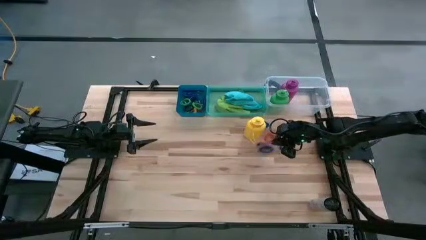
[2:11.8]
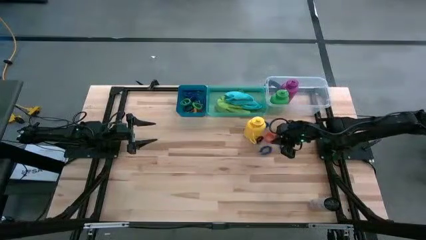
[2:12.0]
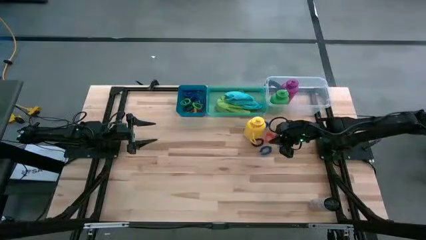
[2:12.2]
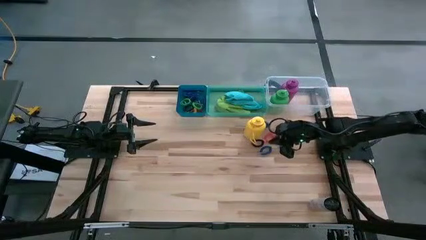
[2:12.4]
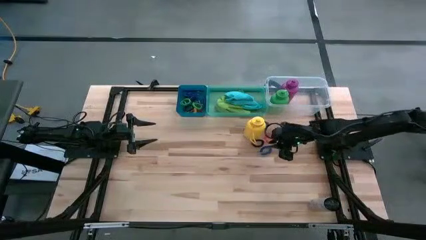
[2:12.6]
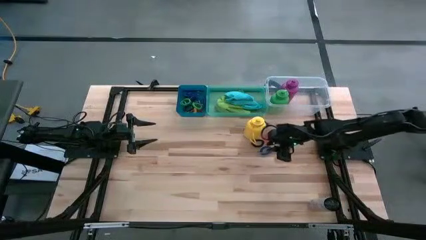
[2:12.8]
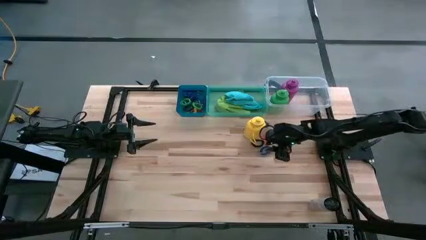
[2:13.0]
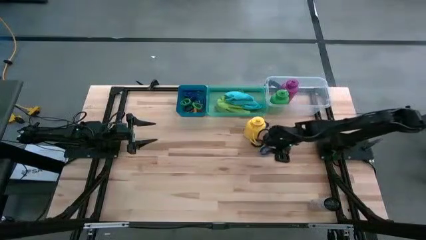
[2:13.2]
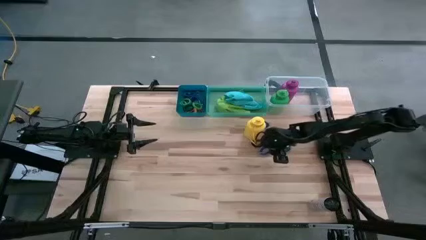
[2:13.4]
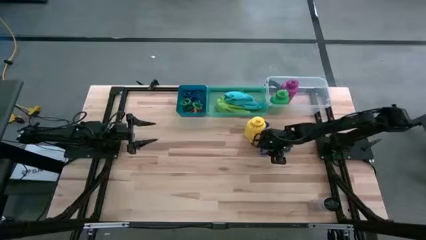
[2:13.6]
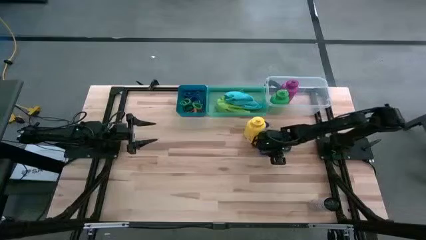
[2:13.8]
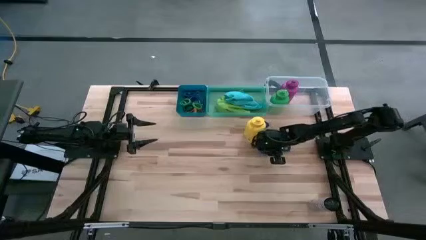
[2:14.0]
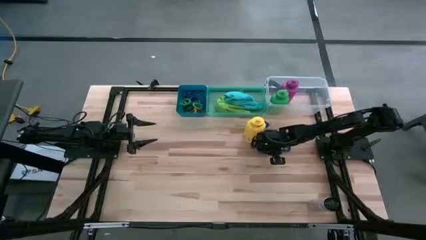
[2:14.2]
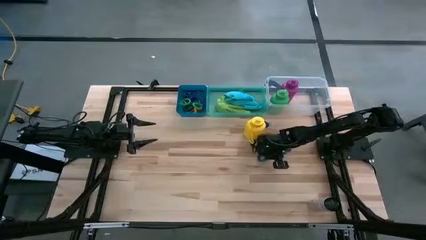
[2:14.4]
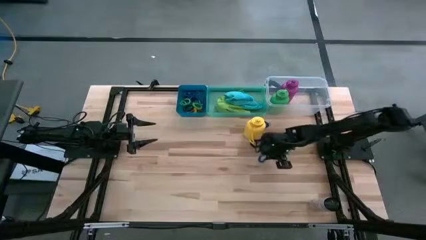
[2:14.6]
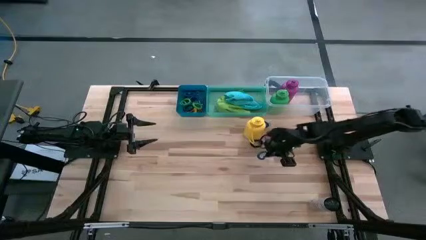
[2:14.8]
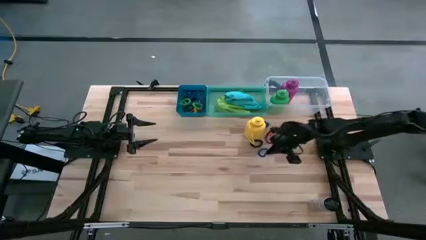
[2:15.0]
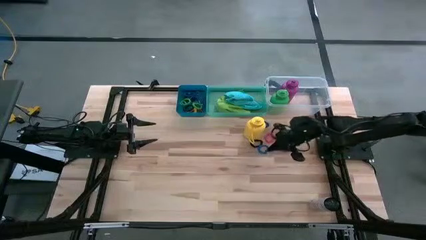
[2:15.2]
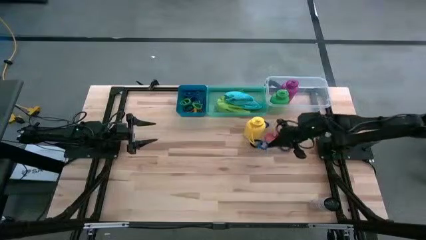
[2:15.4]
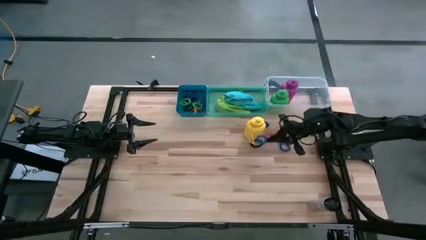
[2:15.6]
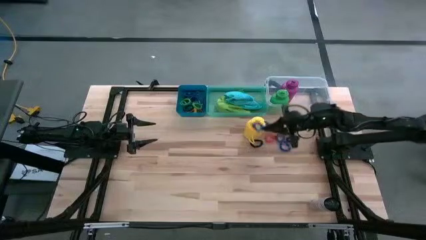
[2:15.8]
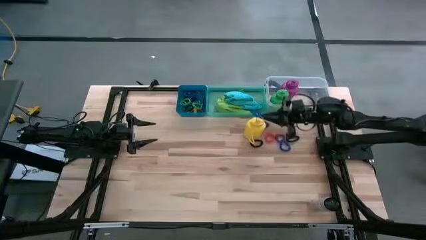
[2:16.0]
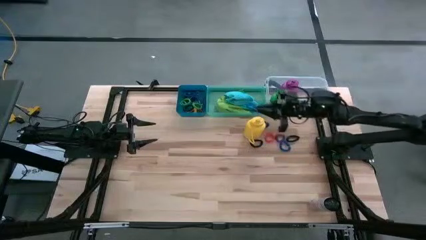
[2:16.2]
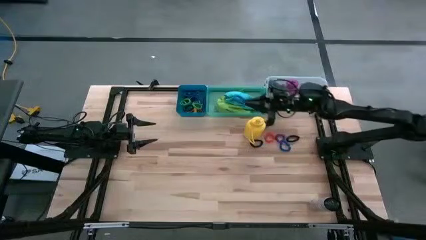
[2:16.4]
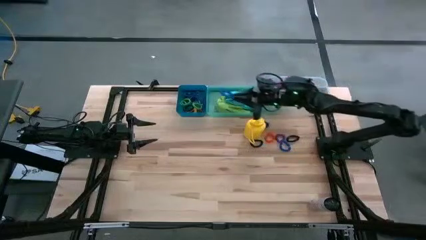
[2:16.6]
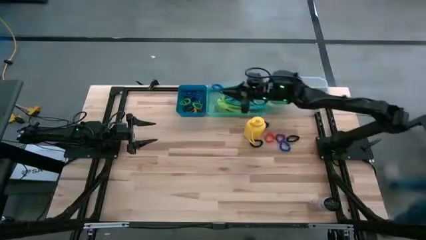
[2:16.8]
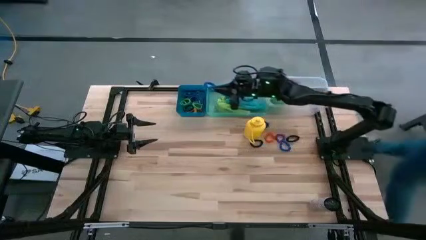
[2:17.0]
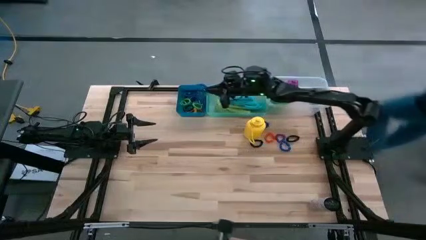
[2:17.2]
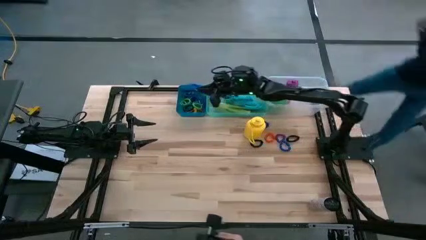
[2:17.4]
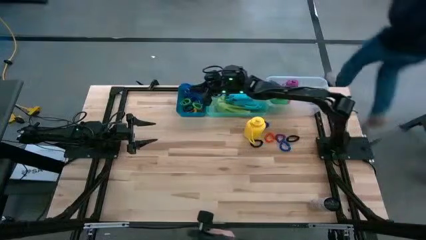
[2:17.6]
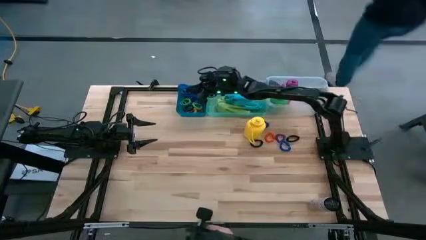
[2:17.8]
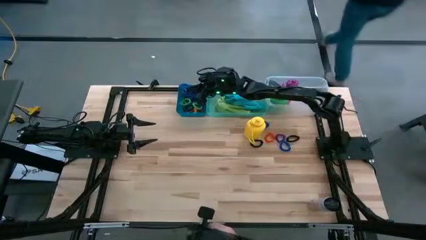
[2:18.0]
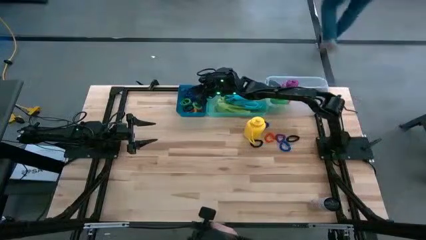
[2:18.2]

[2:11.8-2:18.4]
Task: Pick & Place Sports Items
Put the bottom blue spring keychain into the blue bin

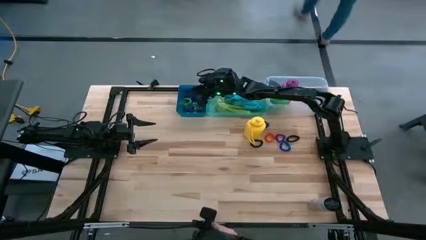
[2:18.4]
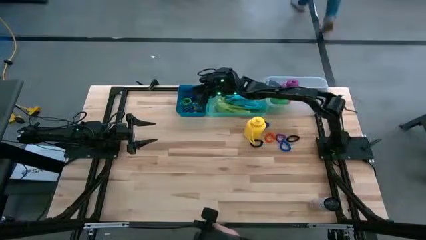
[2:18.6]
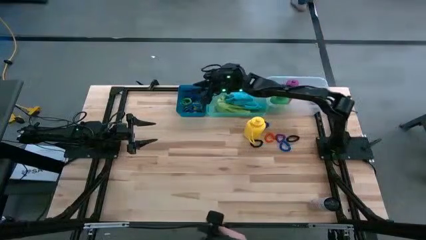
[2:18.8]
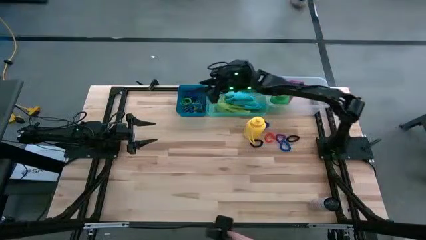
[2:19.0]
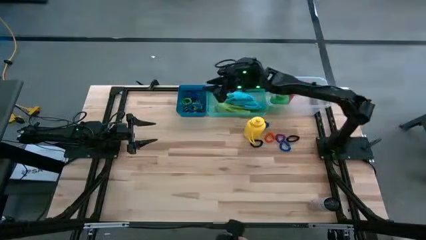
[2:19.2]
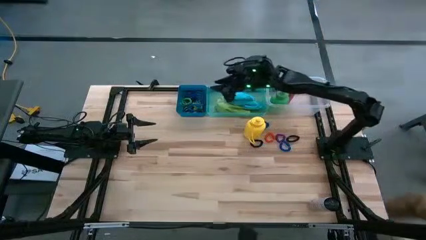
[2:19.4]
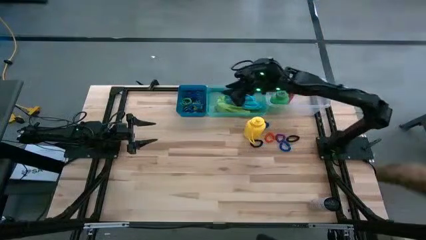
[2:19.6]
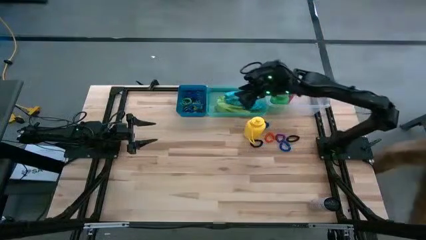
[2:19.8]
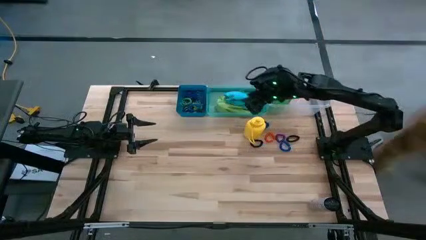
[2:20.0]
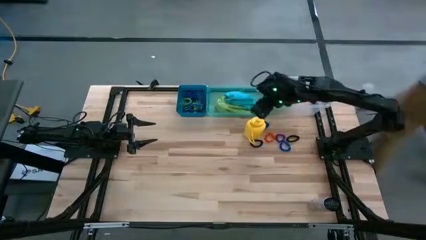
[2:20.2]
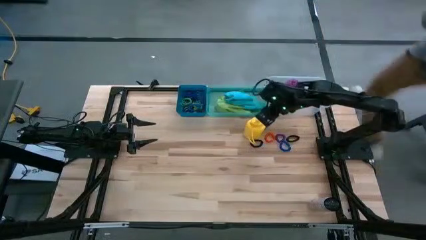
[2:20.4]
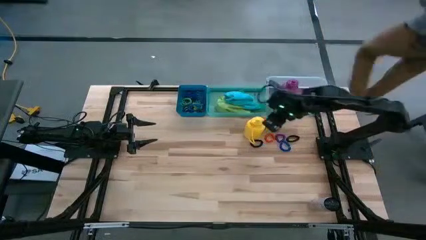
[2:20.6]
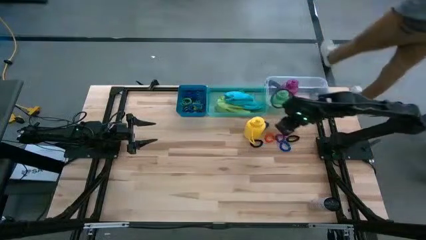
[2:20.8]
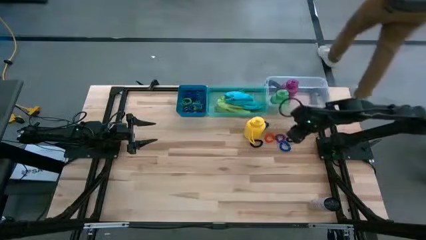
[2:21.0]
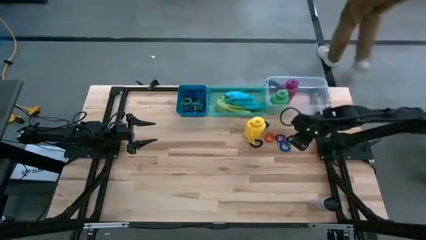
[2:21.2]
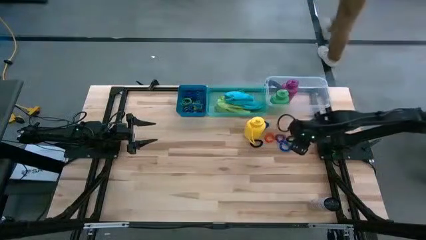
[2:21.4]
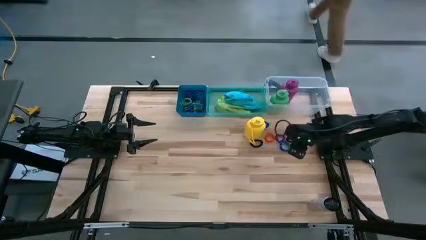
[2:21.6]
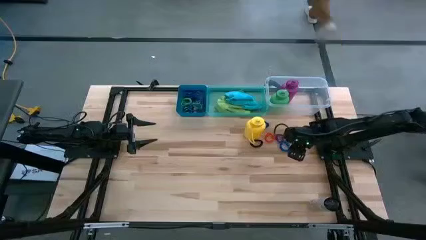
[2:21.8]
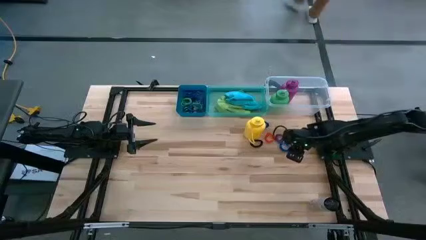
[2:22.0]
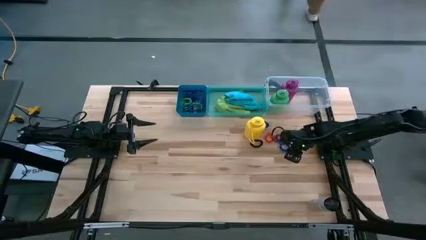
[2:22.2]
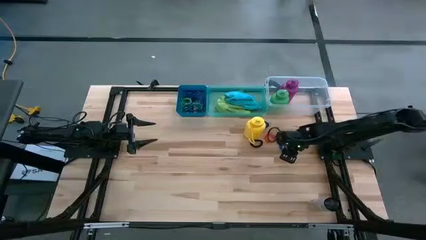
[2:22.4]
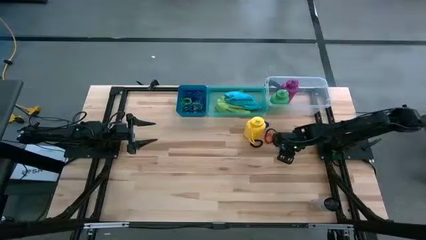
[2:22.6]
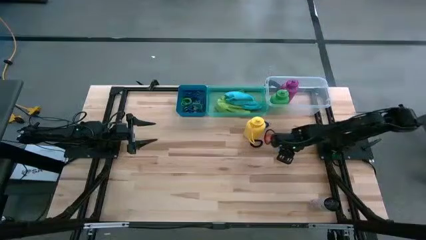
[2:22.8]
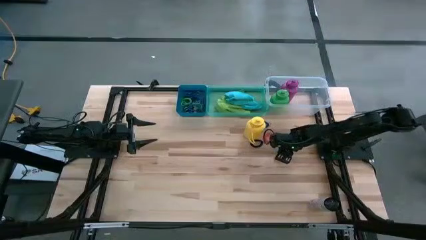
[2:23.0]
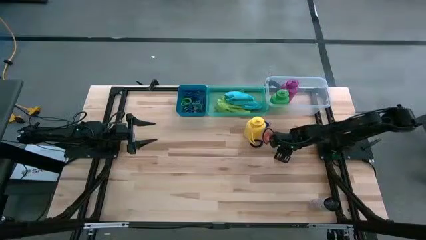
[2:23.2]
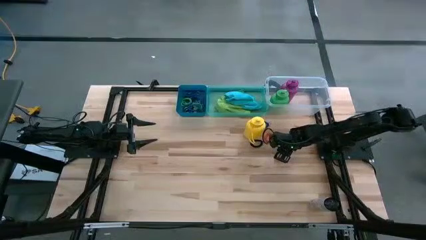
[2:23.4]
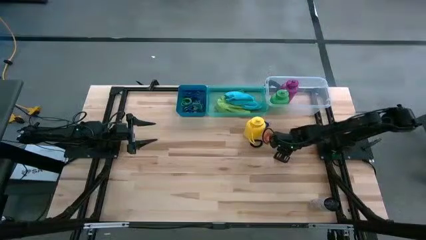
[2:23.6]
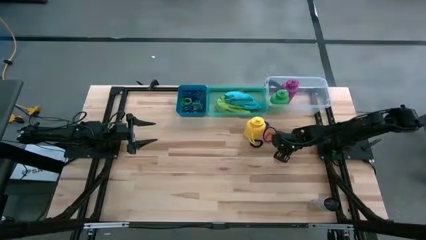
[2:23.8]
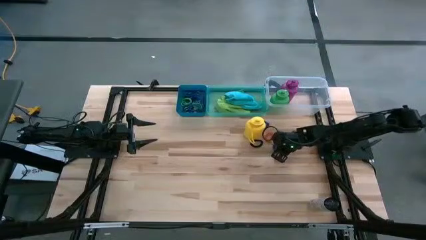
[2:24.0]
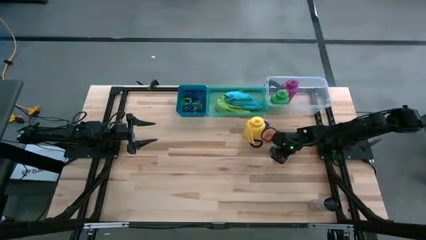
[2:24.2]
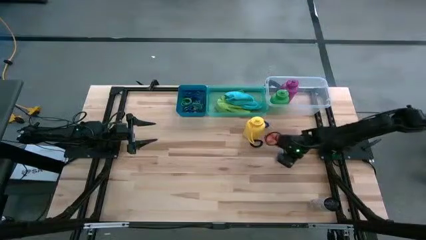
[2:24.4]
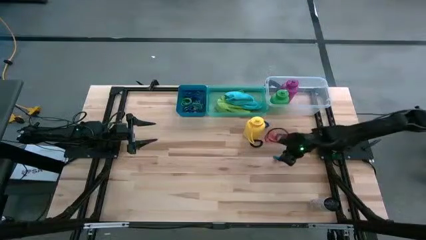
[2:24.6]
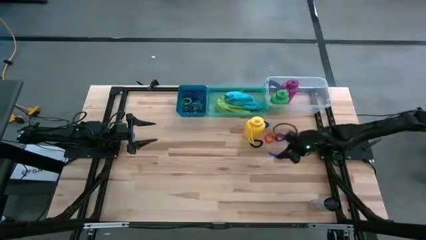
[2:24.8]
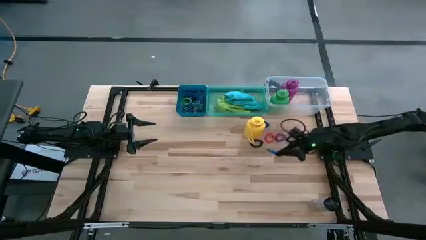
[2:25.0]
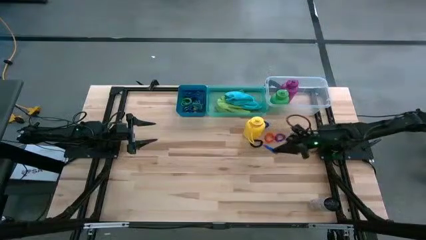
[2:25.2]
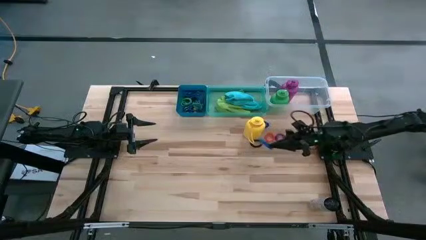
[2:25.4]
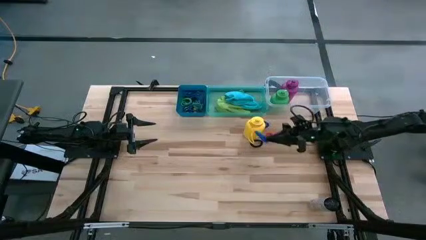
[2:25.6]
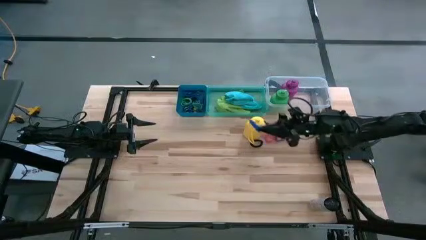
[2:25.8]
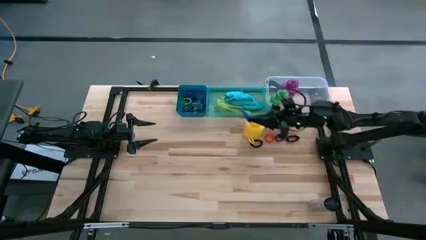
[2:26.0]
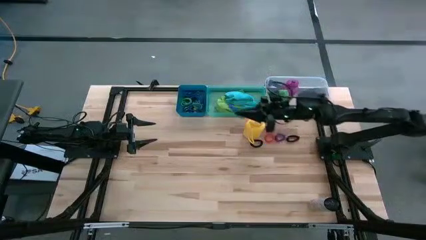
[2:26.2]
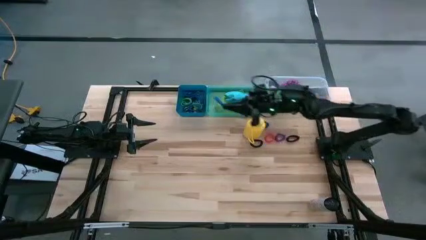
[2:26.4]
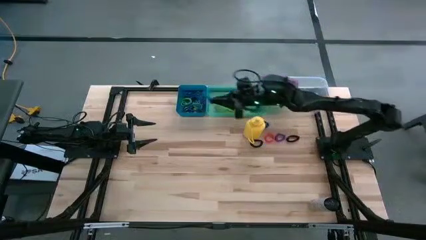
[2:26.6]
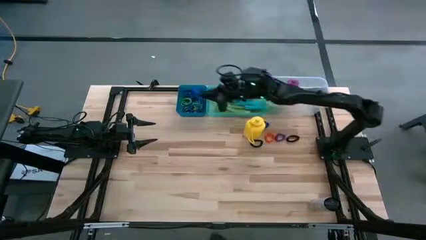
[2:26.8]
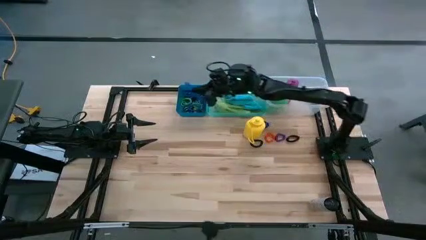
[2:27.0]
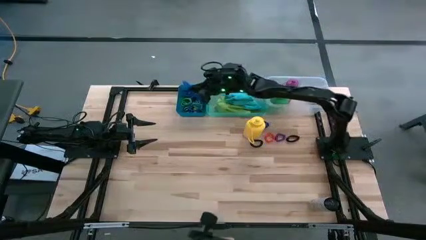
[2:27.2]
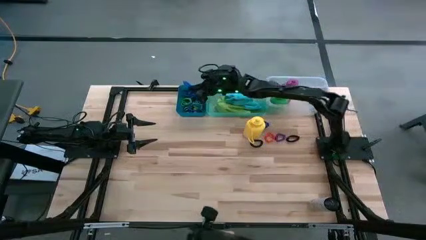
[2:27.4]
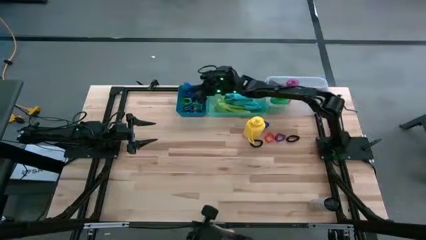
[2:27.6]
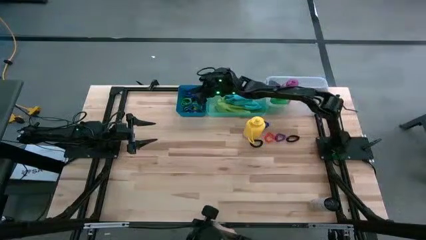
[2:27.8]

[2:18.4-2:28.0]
Put the bottom blue spring keychain into the blue bin
